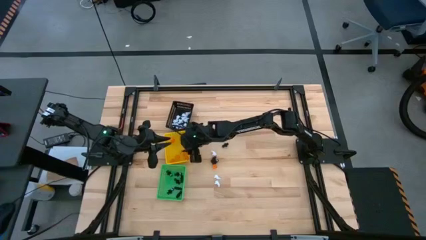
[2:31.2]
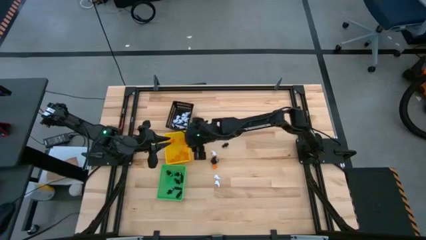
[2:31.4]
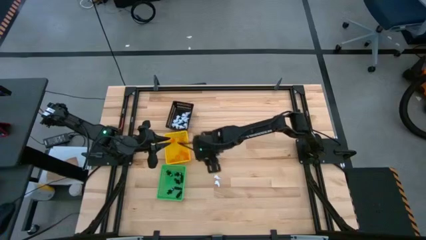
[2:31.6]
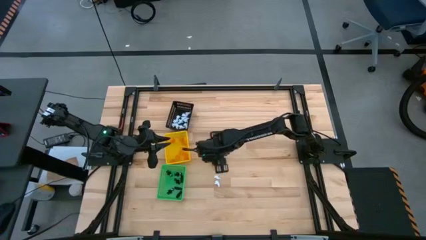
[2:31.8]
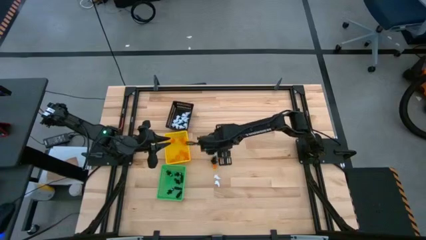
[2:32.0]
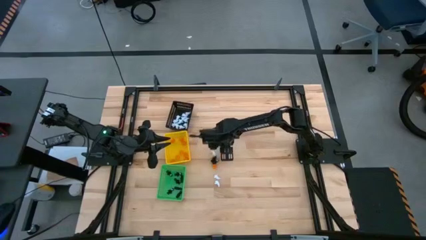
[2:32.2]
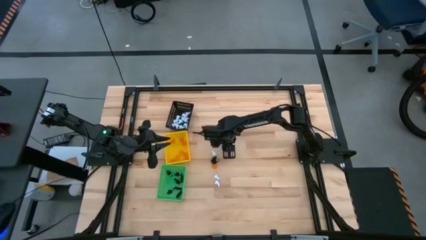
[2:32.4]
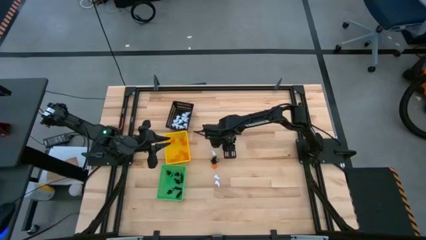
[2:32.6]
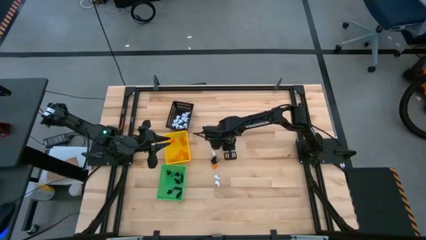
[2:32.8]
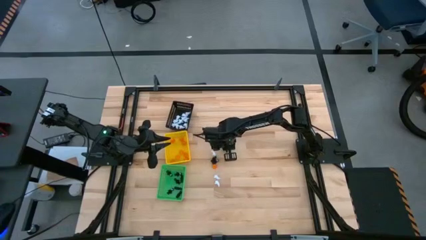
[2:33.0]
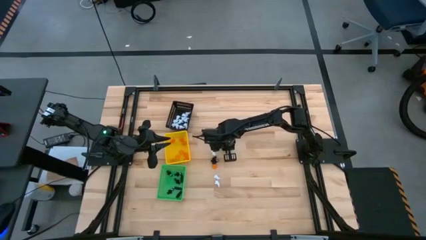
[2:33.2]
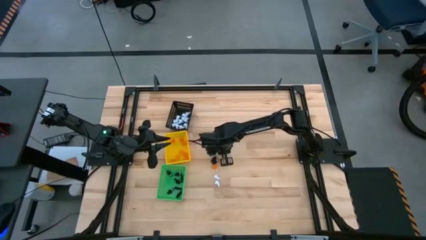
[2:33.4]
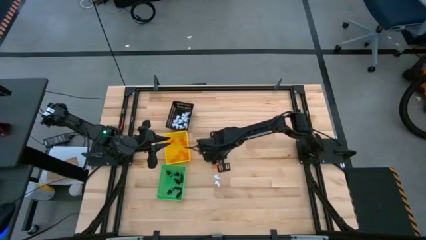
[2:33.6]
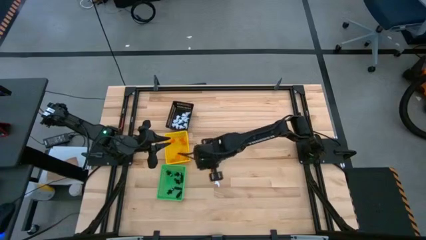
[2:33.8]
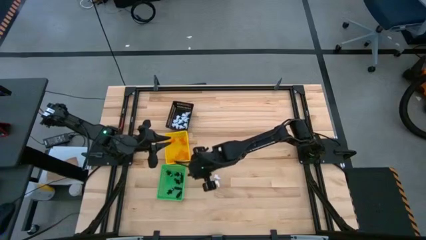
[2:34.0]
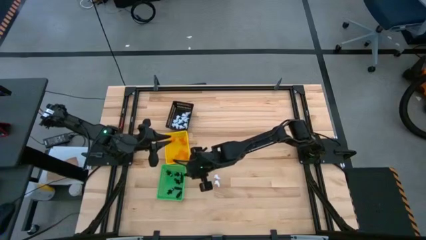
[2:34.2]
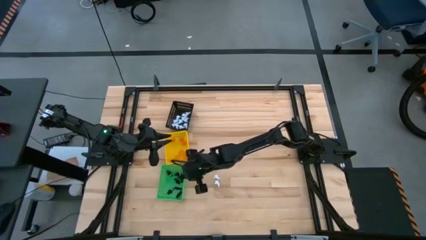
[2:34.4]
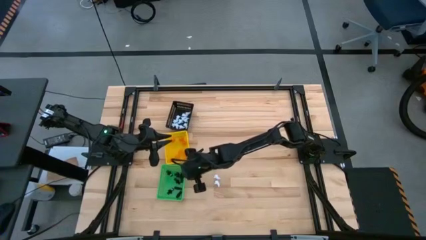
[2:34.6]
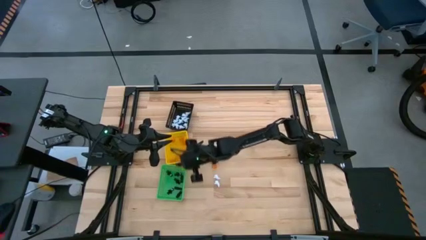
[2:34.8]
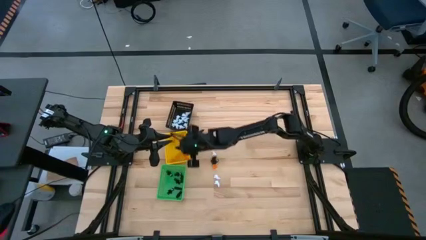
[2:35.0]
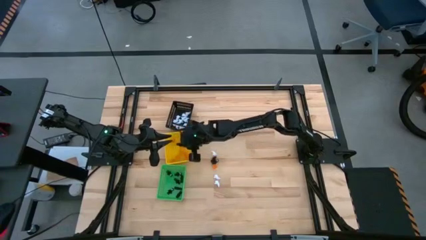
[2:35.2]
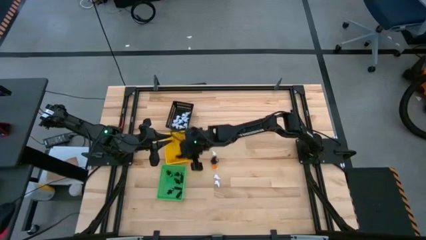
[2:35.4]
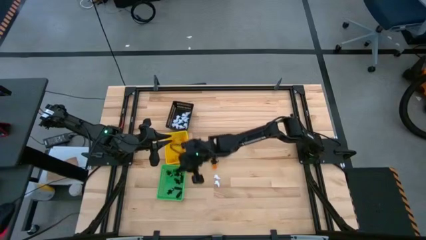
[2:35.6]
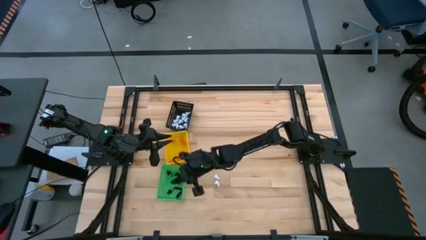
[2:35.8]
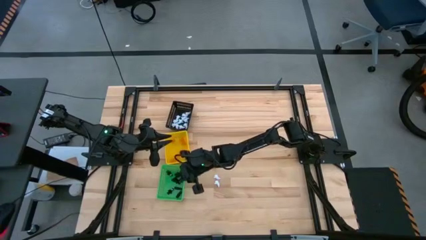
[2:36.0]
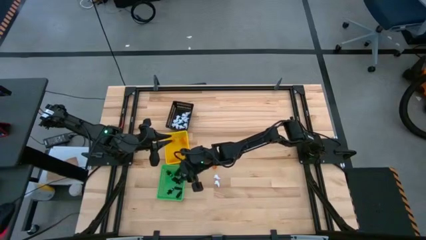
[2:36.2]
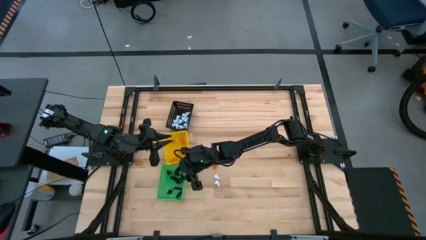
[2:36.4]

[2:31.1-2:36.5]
Task: Sort Halloween decoration
Put the black skeleton toy into the green basket

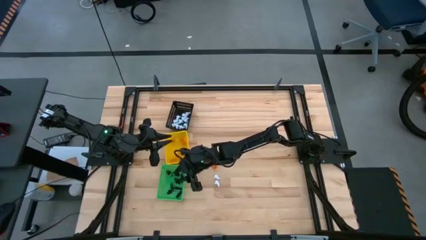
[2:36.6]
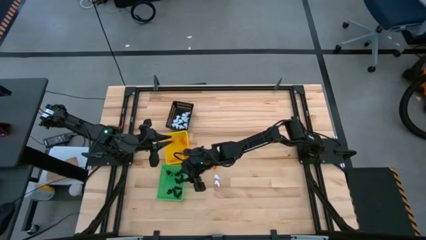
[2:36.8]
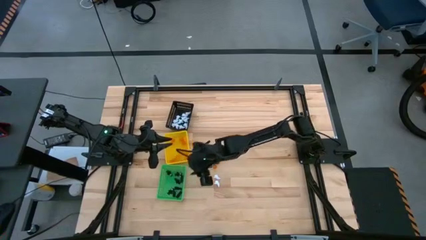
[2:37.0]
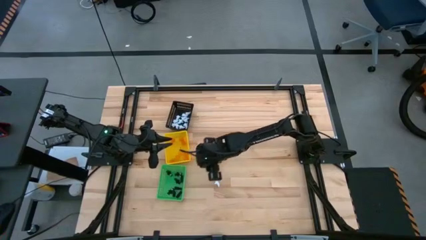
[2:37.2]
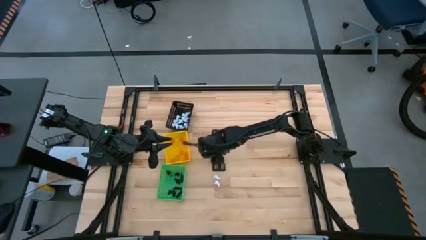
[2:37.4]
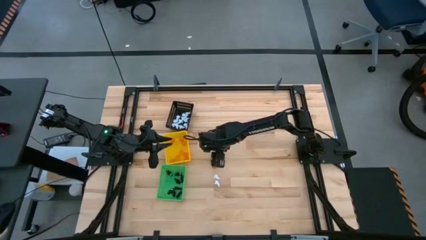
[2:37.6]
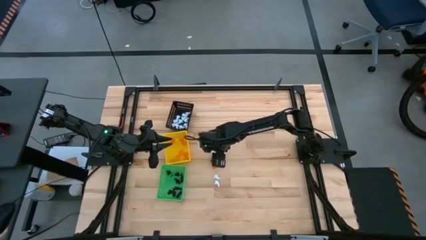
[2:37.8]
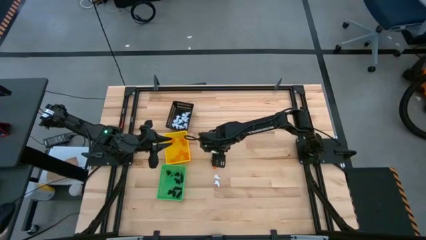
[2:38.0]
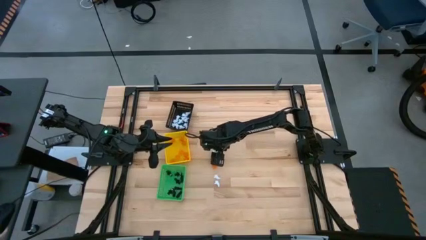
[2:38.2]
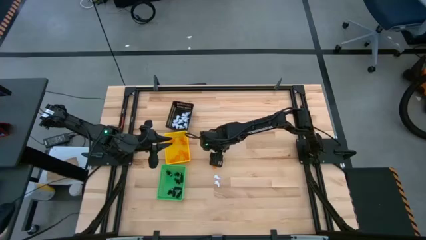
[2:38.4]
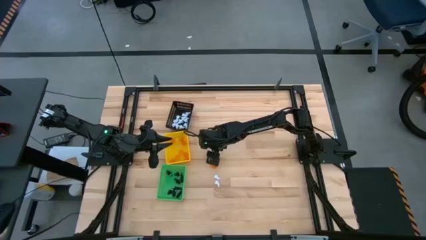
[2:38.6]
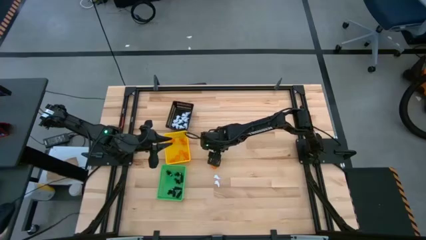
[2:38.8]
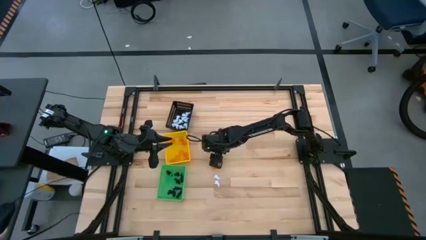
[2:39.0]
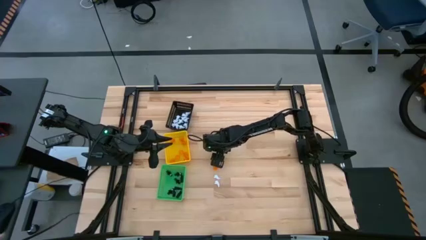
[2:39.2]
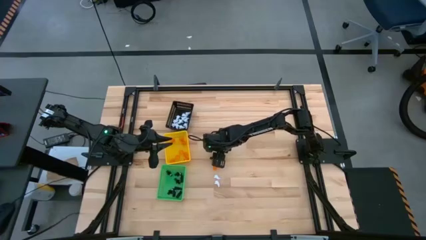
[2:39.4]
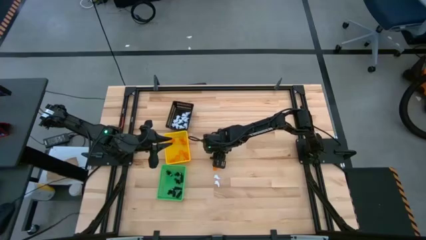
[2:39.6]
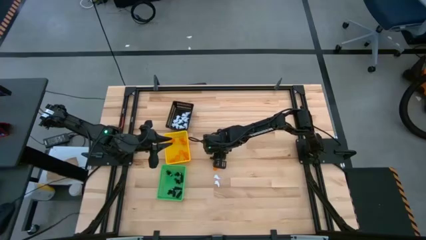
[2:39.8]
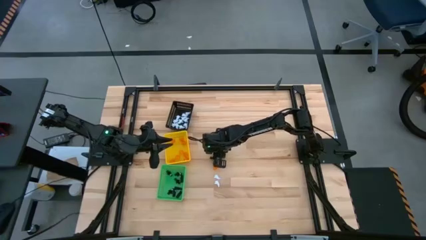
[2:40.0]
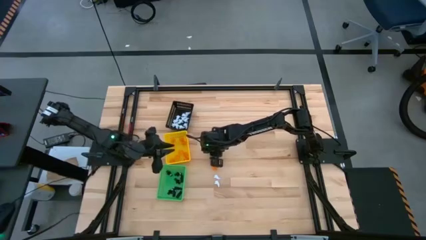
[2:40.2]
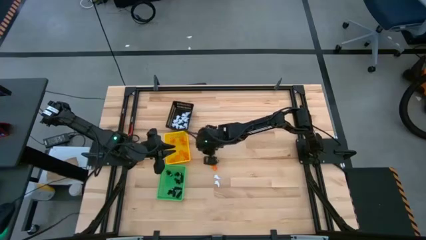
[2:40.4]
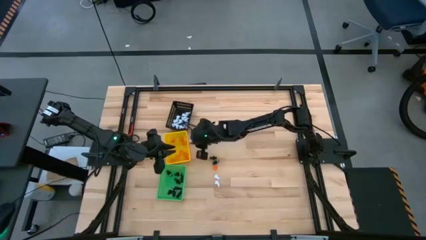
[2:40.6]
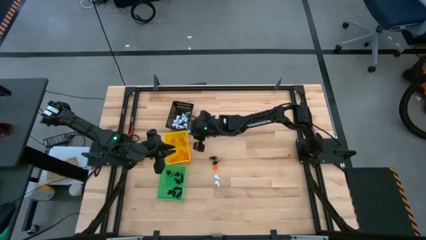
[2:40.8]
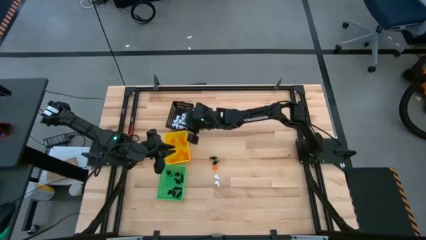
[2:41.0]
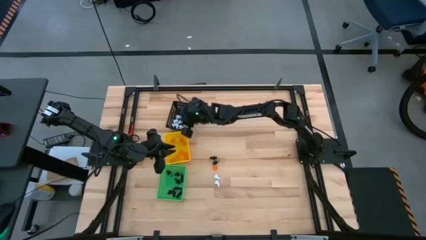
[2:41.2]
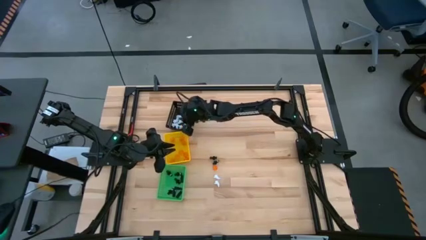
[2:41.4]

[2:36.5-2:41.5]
Put the white ghost plush toy into the black basket

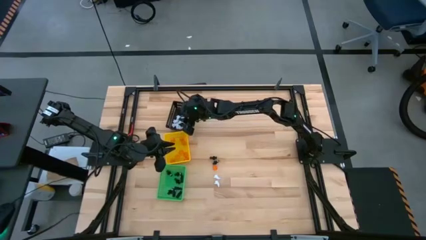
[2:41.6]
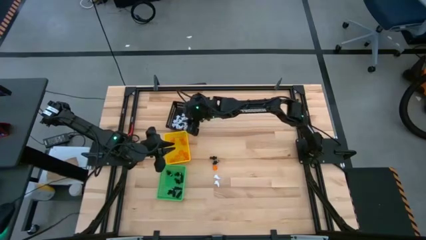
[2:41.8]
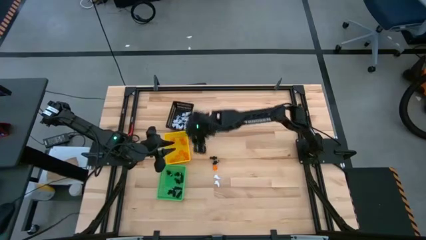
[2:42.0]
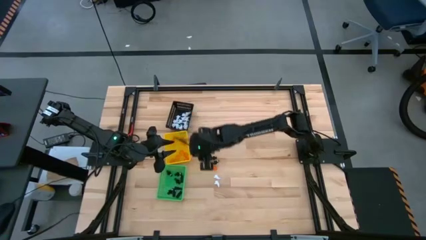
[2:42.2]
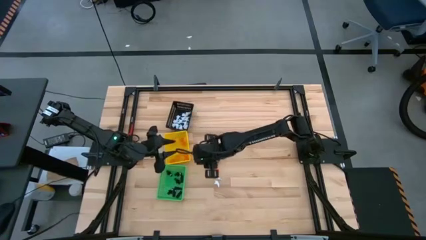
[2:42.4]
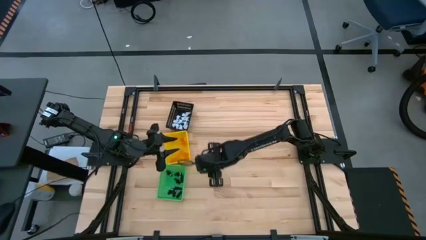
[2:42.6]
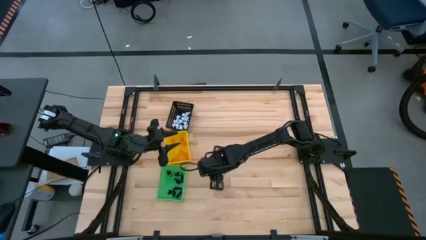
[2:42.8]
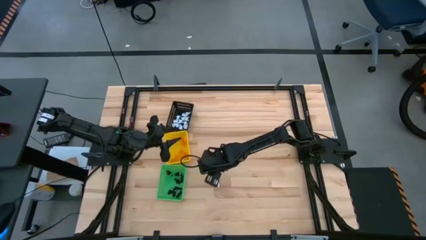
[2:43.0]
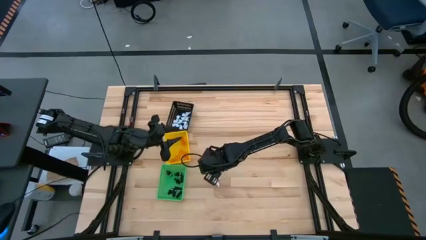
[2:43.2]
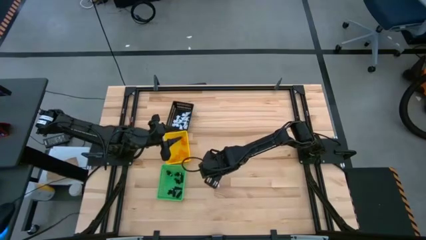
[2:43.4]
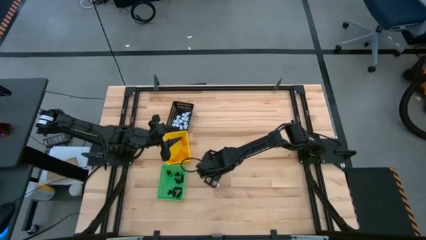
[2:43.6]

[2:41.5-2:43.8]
Put the orange pumpkin toy into the yellow basket

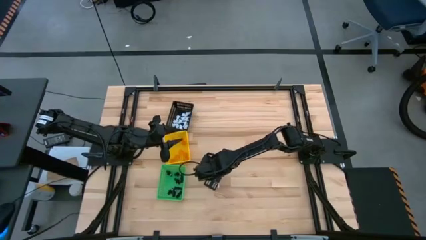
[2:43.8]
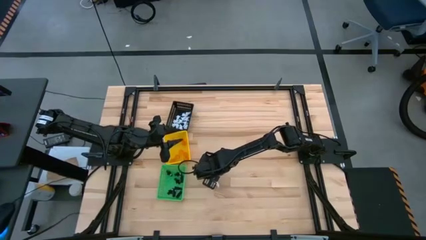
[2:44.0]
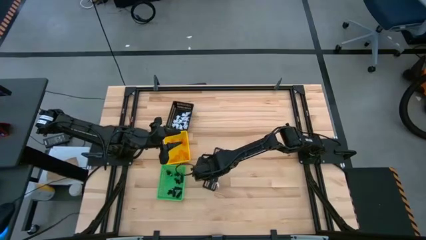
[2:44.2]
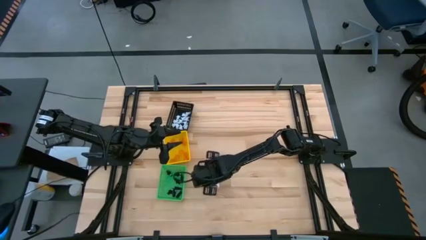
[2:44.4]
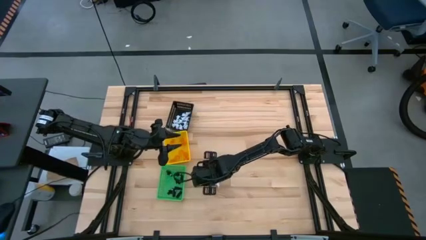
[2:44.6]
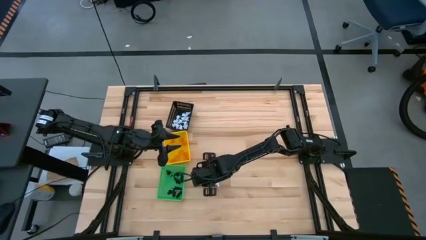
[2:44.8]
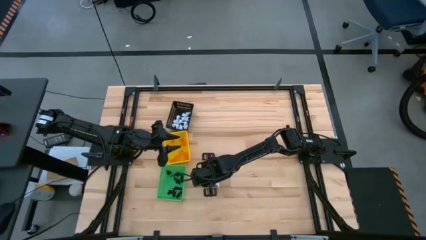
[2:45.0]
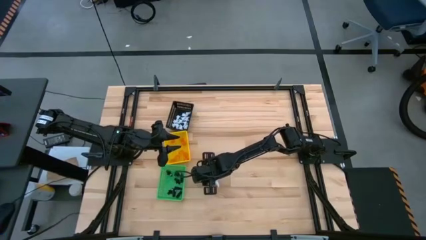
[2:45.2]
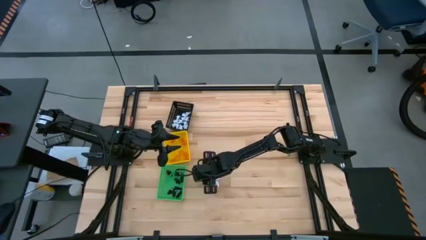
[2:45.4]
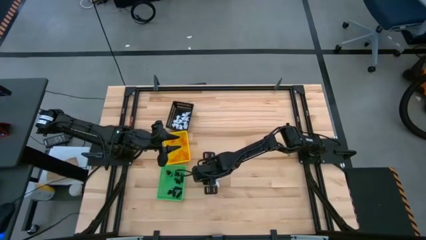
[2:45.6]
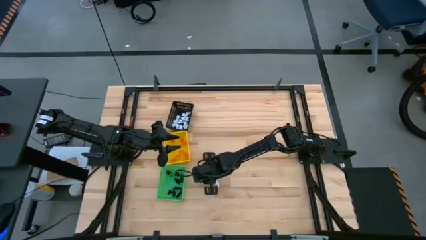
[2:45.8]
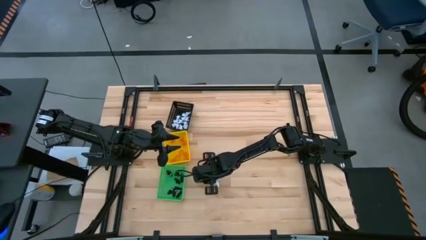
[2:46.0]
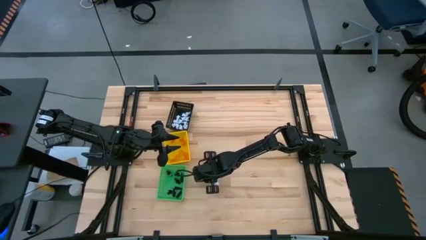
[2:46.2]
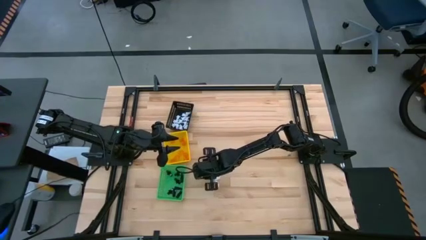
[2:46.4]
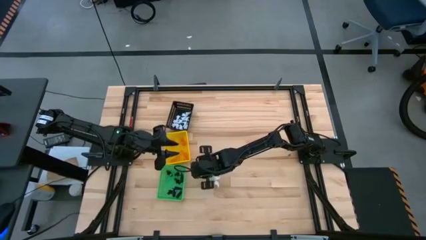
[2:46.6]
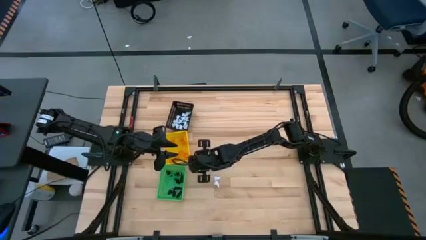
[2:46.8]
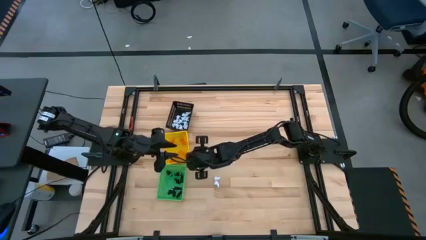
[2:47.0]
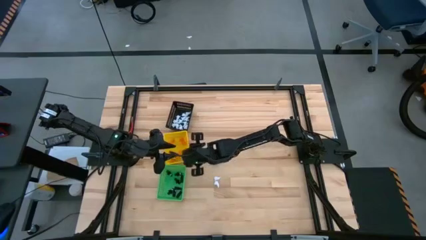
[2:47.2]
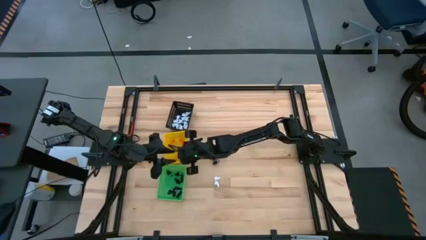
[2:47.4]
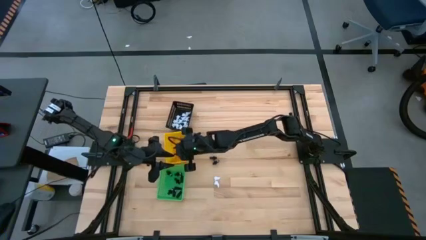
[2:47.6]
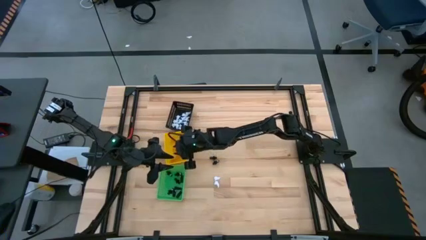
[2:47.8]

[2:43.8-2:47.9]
Put the orange pumpkin toy into the yellow basket
